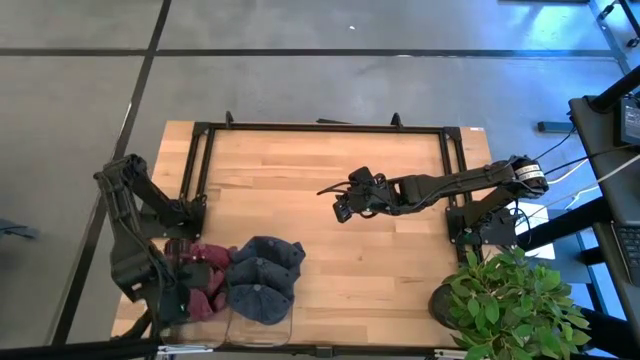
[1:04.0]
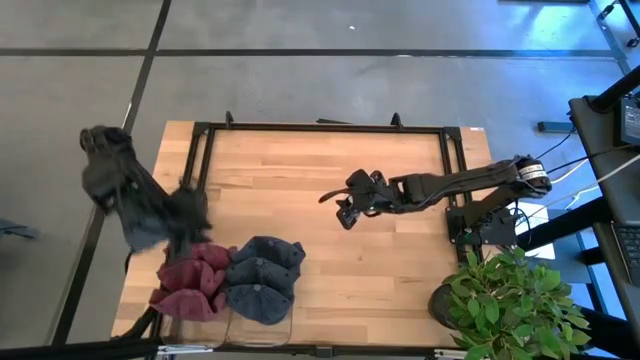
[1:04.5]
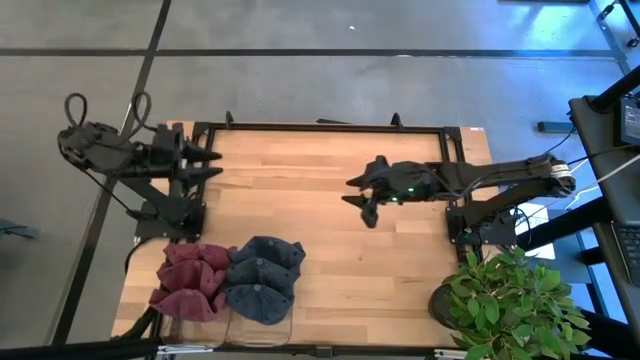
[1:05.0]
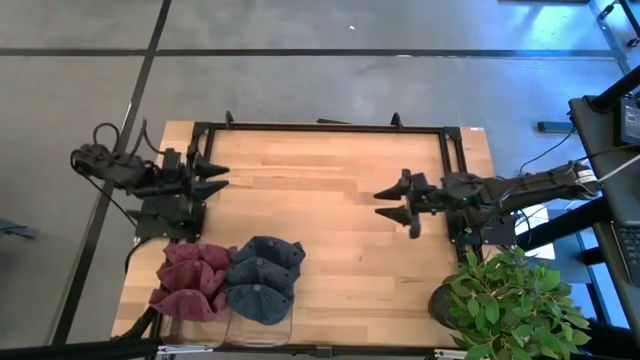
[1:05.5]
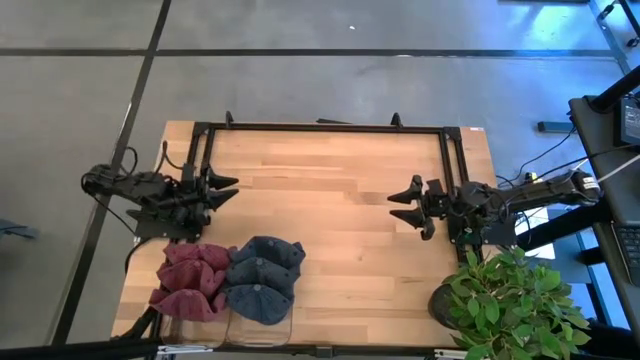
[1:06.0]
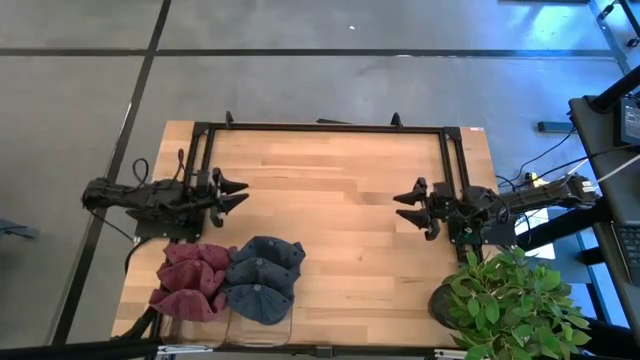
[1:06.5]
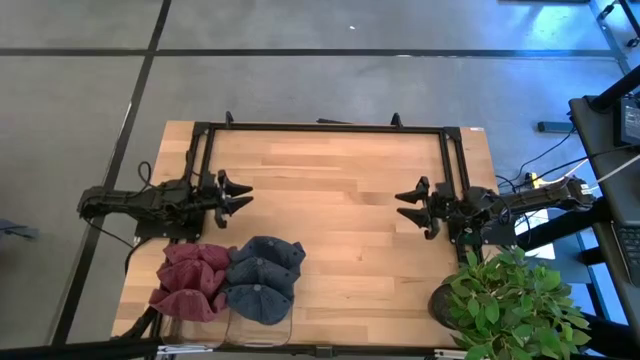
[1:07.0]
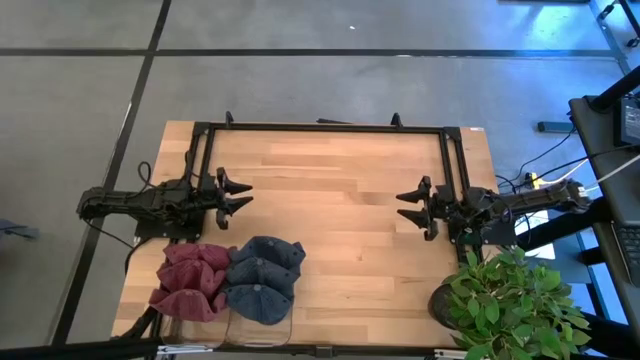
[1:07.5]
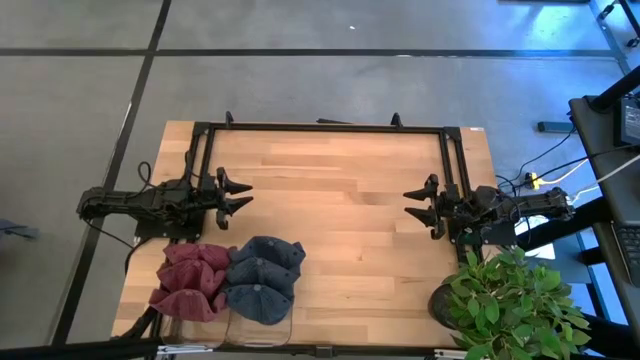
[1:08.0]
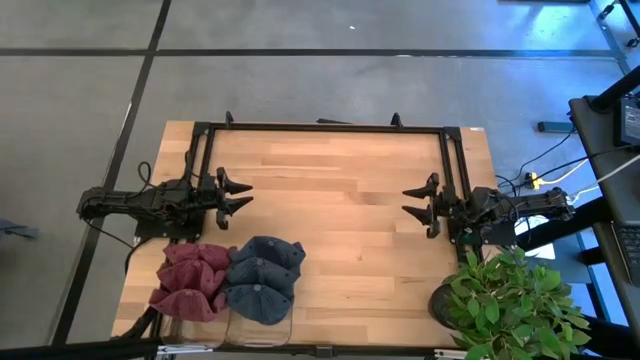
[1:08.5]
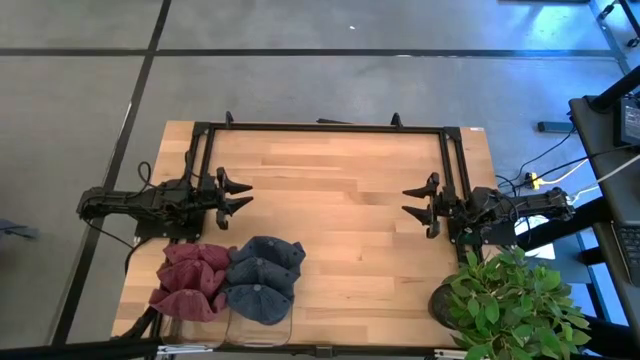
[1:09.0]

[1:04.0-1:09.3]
Task: Pick & Place hat
Return to Home Position

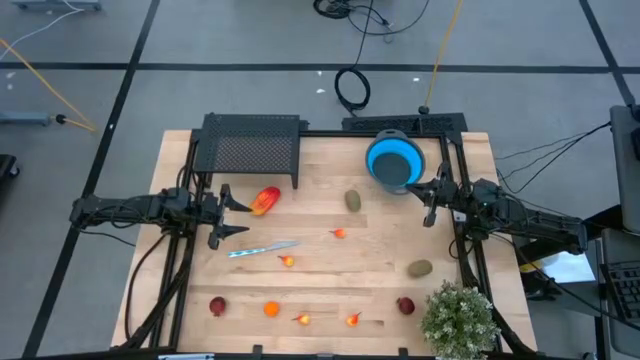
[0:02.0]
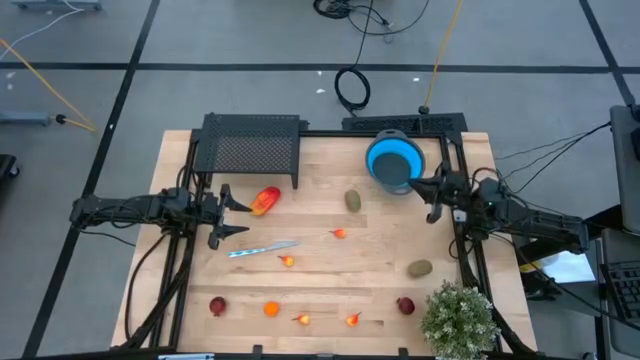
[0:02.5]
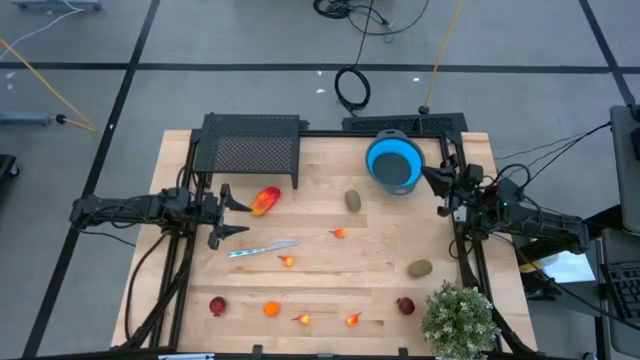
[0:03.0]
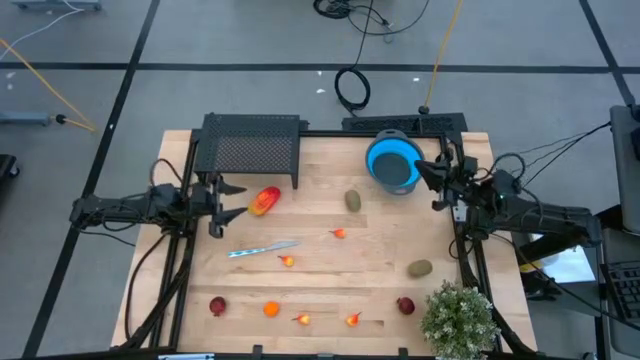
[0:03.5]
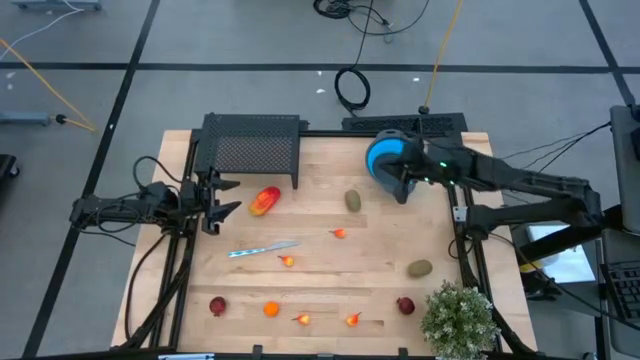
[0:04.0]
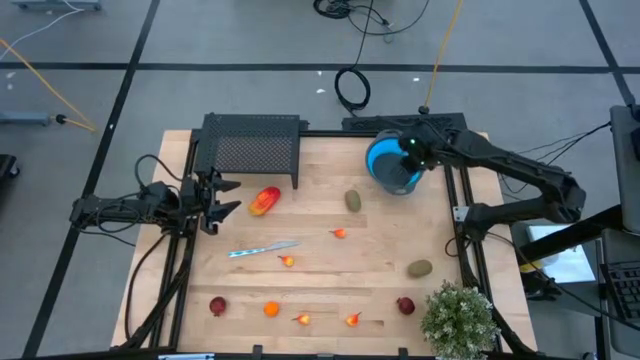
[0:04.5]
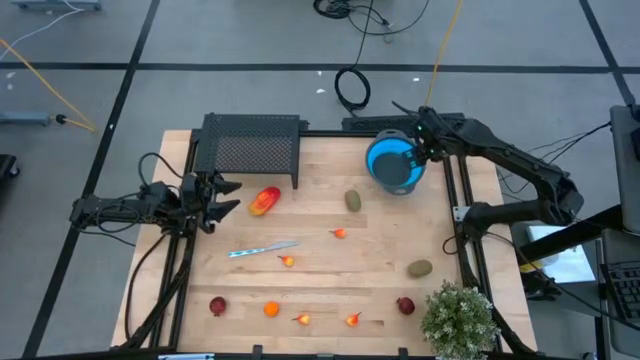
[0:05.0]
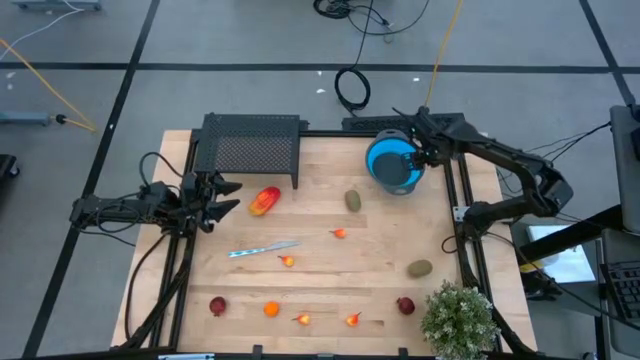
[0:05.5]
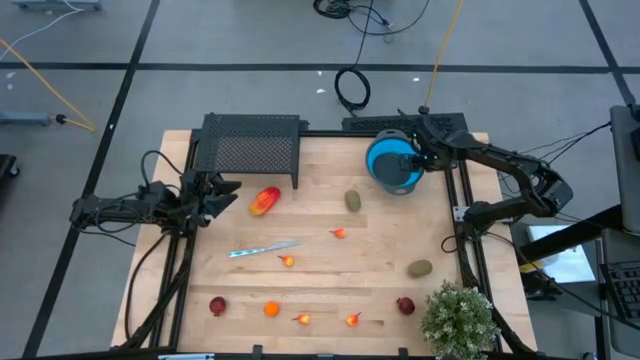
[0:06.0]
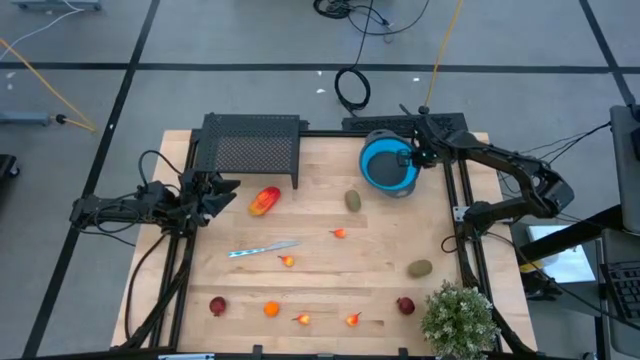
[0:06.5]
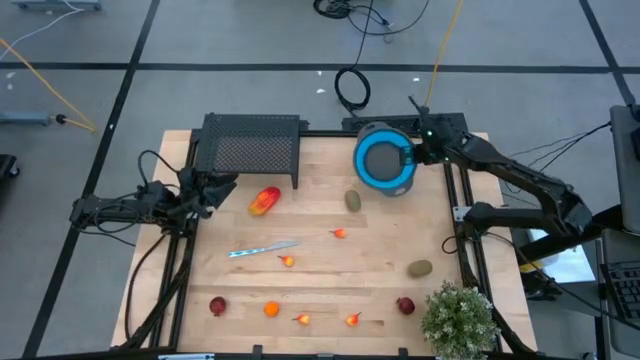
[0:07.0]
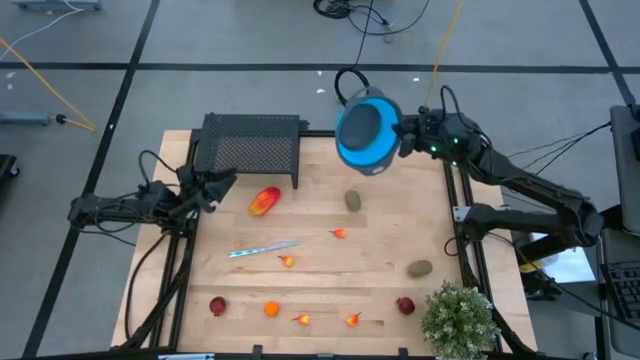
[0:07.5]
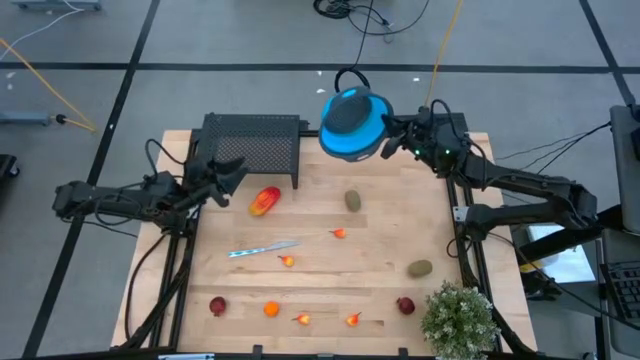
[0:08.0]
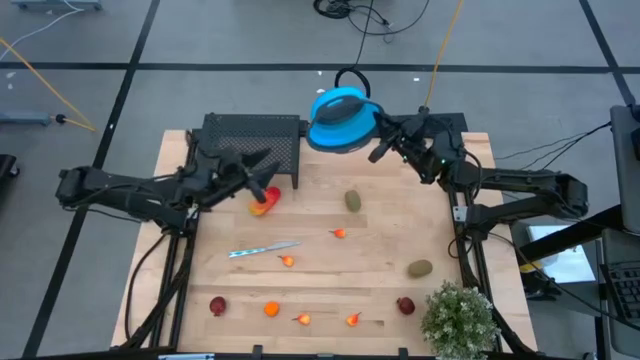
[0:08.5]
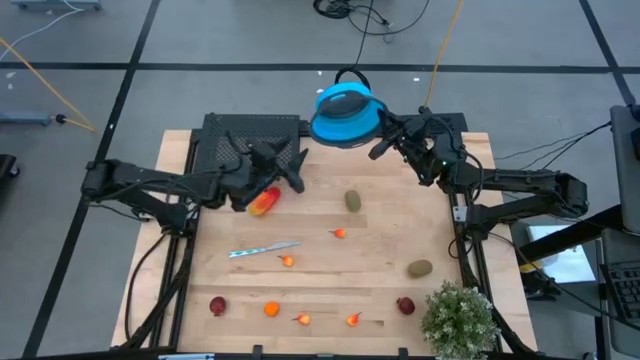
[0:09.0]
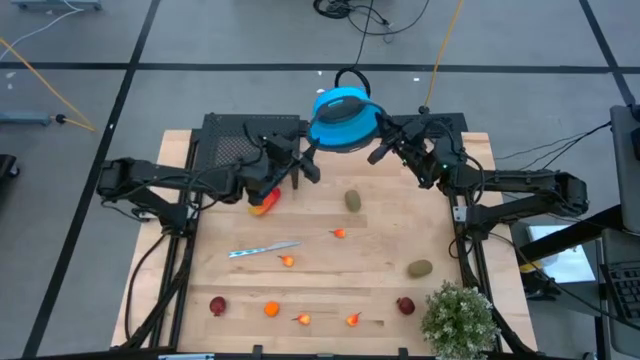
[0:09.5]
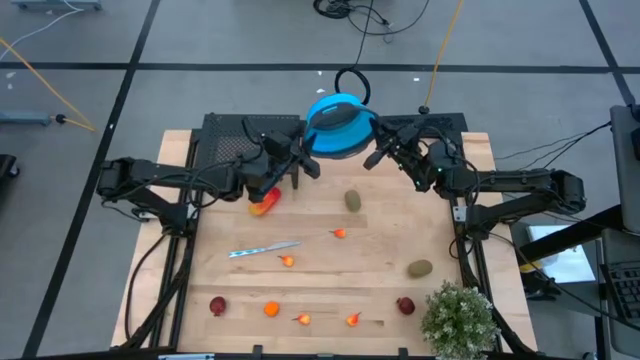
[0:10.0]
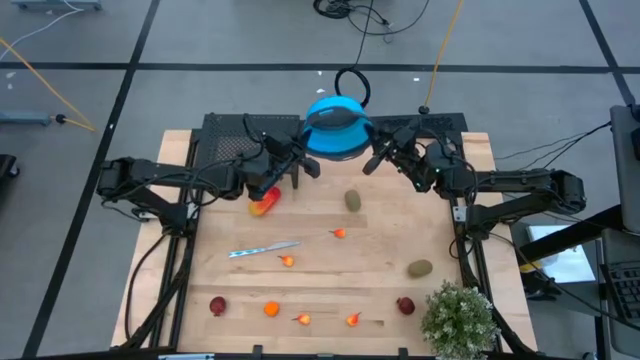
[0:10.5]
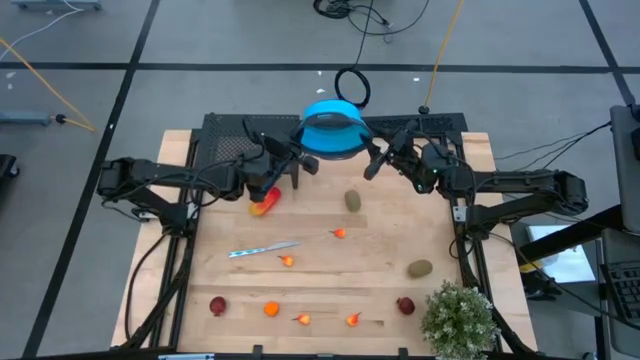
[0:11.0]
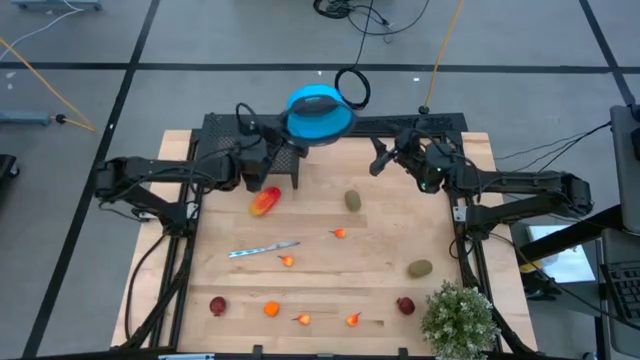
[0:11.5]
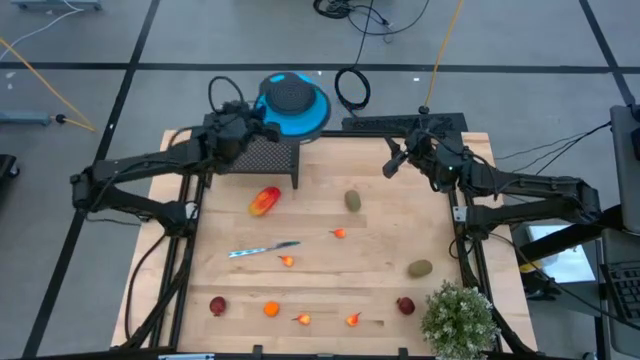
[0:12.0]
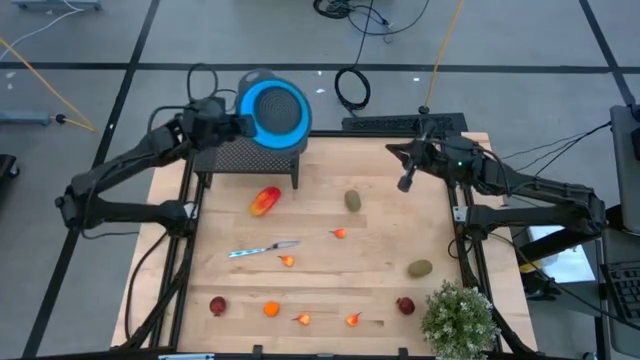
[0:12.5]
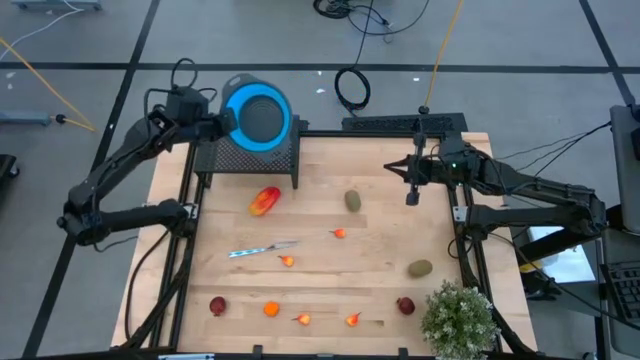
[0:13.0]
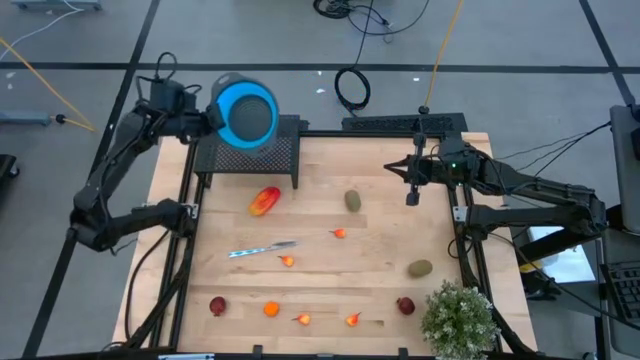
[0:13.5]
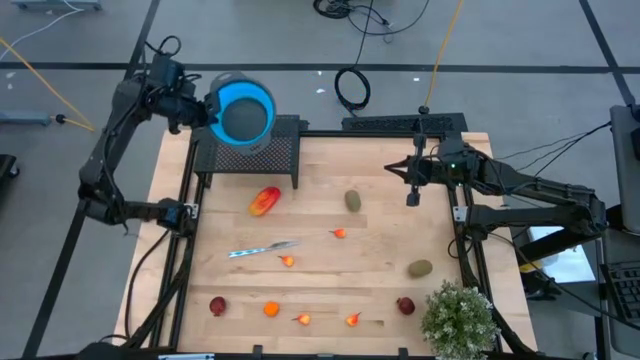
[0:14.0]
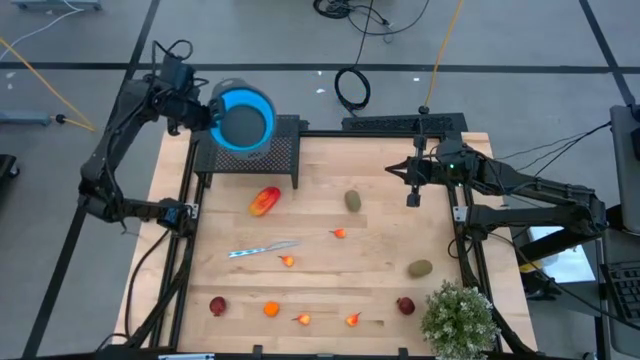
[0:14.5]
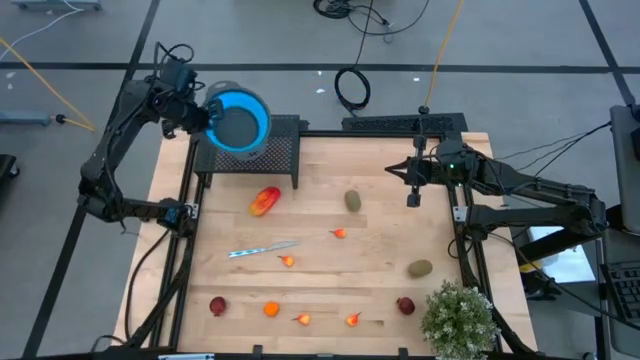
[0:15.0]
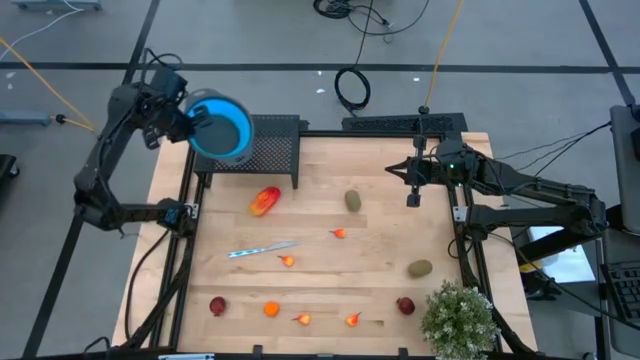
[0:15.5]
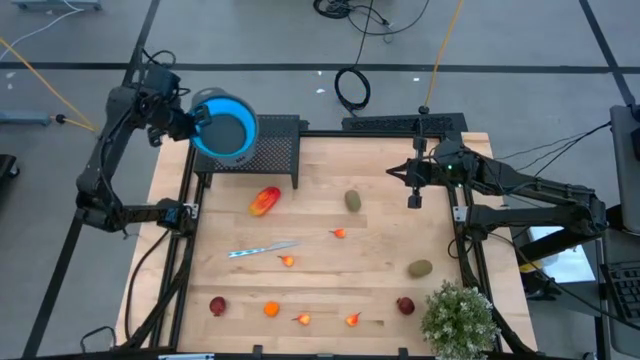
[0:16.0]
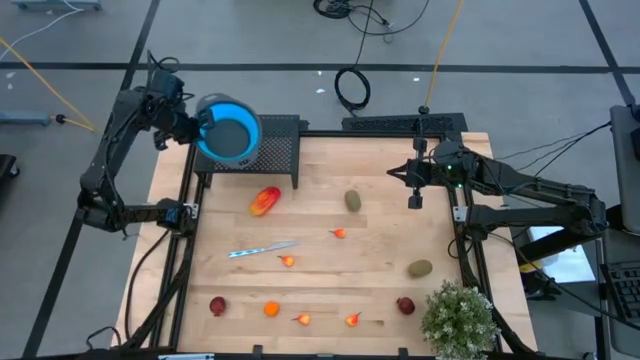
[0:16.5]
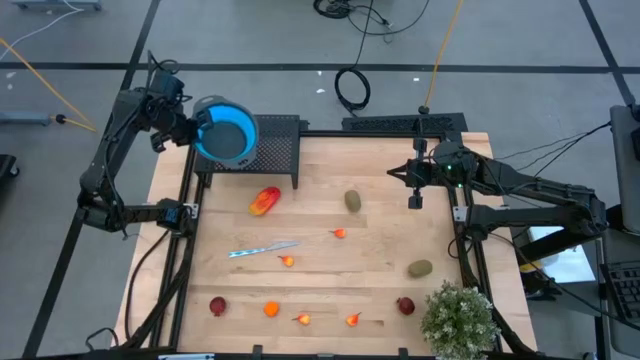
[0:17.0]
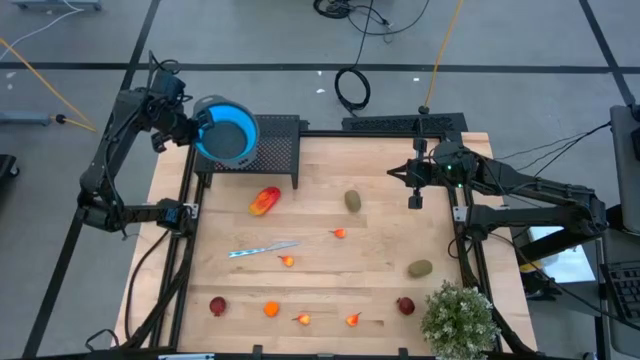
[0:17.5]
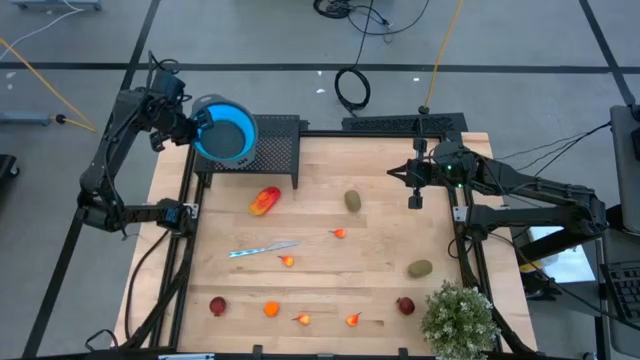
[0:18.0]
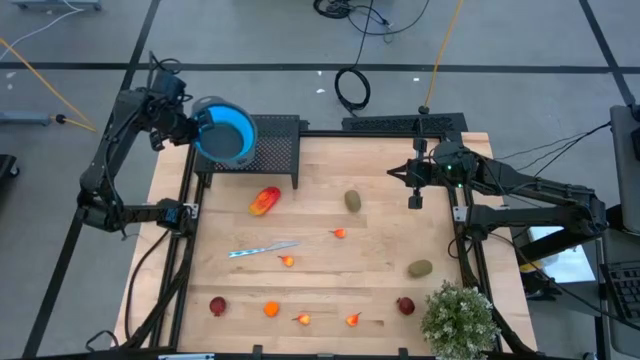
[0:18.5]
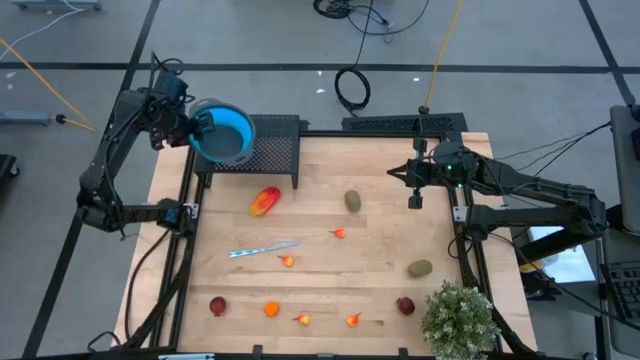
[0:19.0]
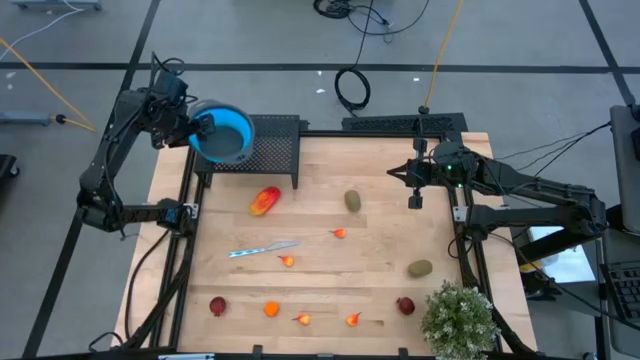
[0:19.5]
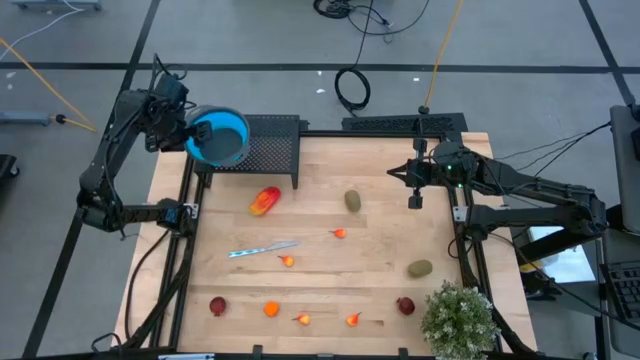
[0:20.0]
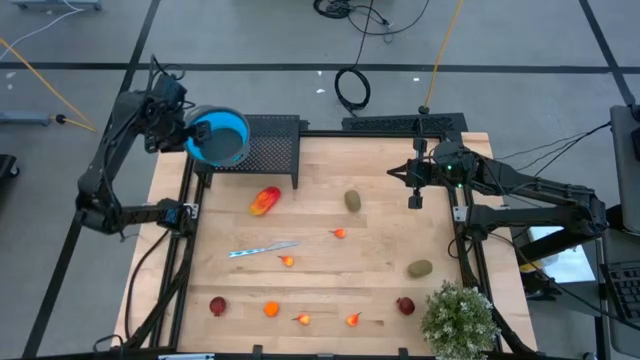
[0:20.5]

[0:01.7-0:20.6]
Task: Pick & Place Fruit
Put the blue strainer bowl on the shelf
